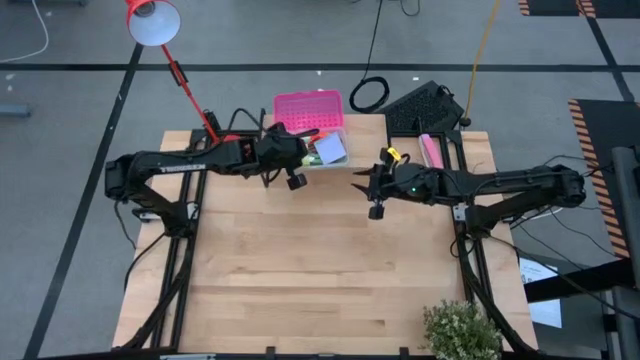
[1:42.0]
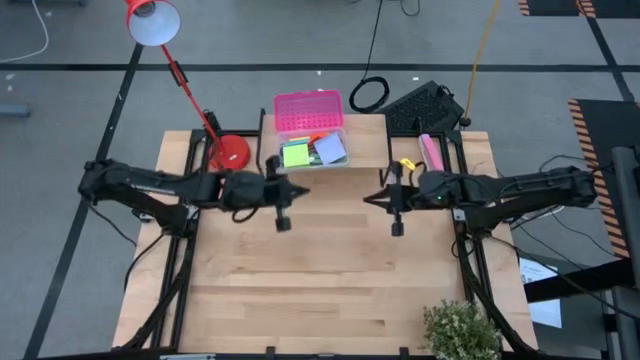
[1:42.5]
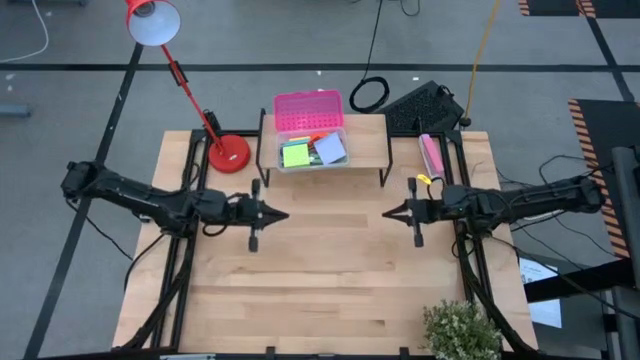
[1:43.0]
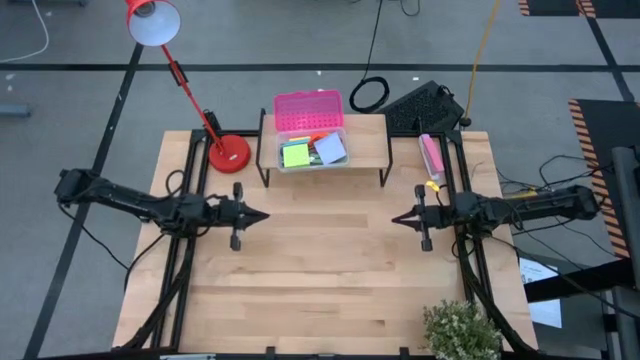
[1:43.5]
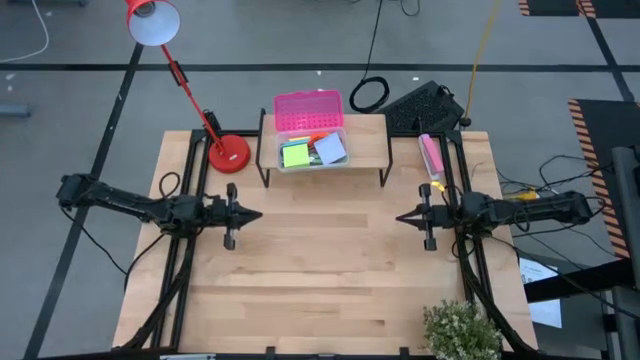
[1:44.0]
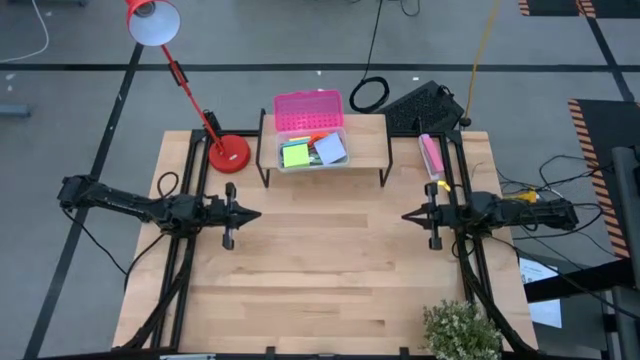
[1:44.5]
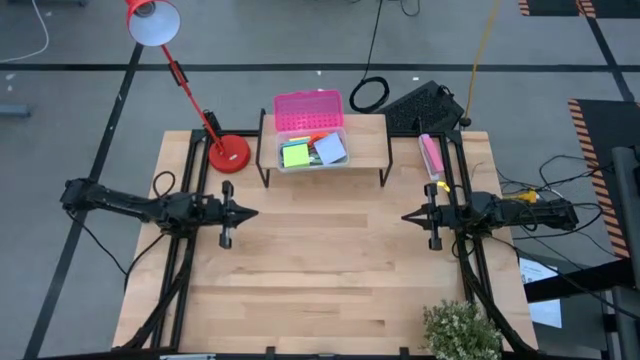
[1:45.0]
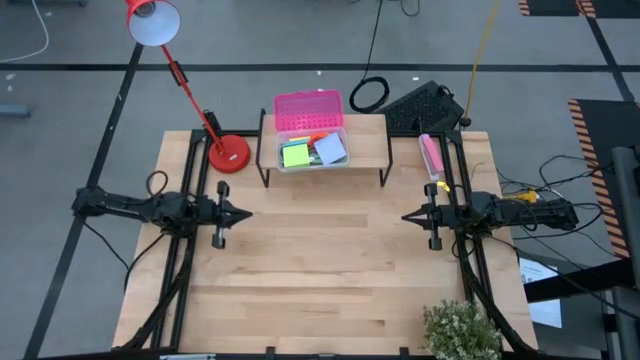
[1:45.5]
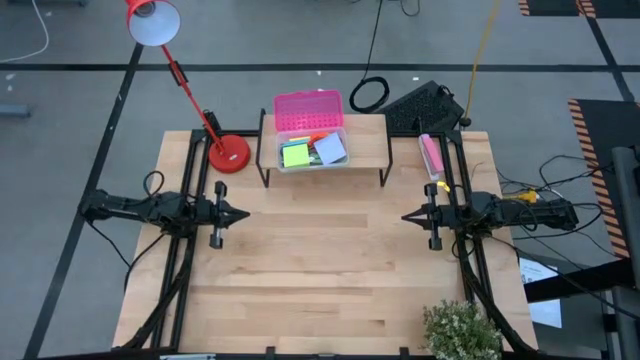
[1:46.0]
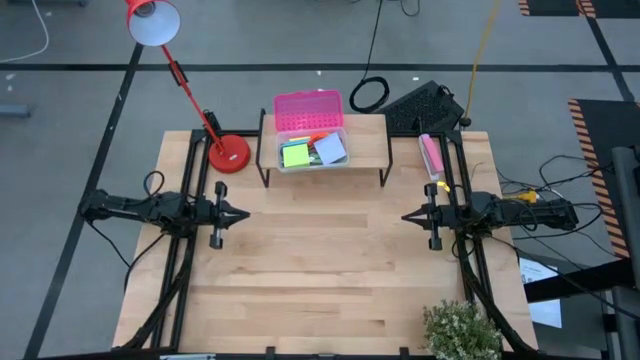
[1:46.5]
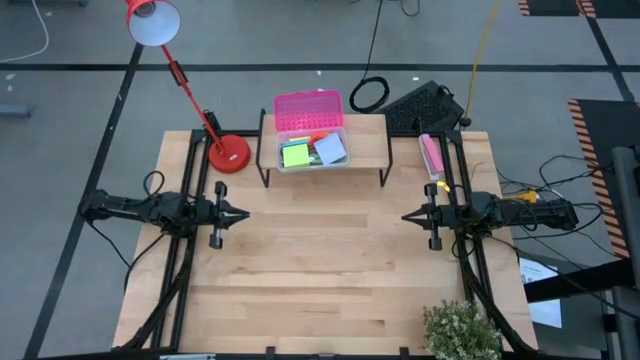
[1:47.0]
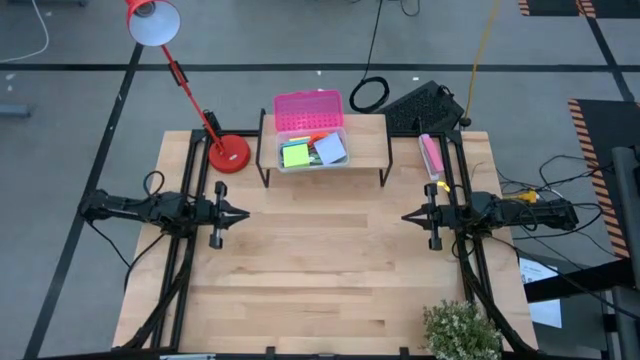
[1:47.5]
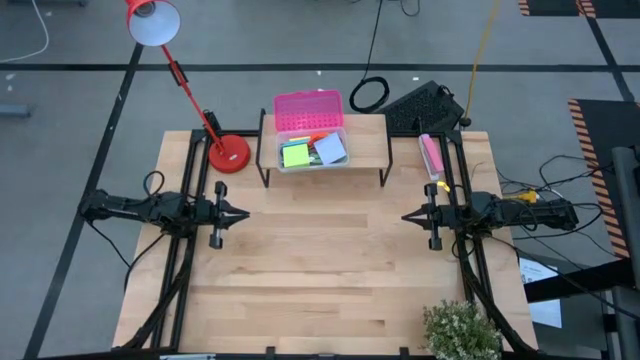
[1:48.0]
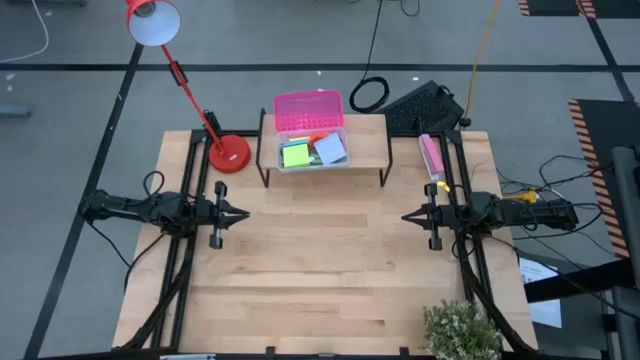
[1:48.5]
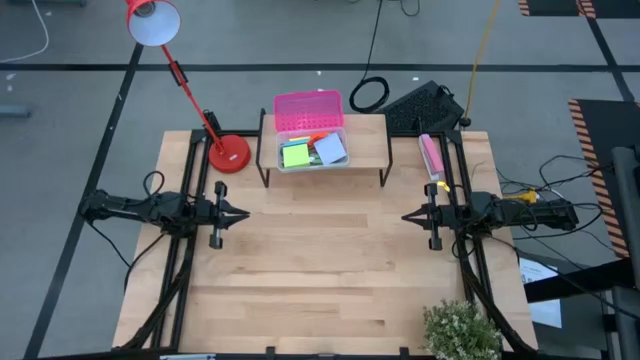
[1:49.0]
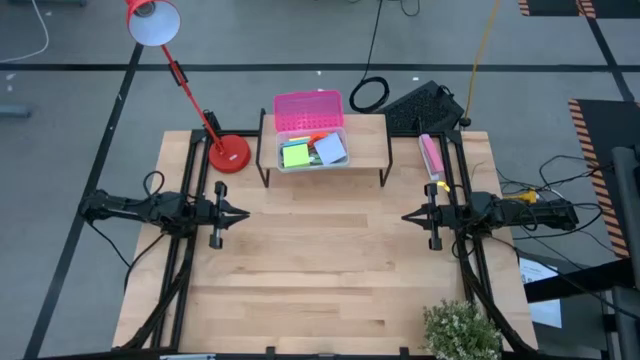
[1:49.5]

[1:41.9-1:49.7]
Task: Pack school essentials
Return to Home Position

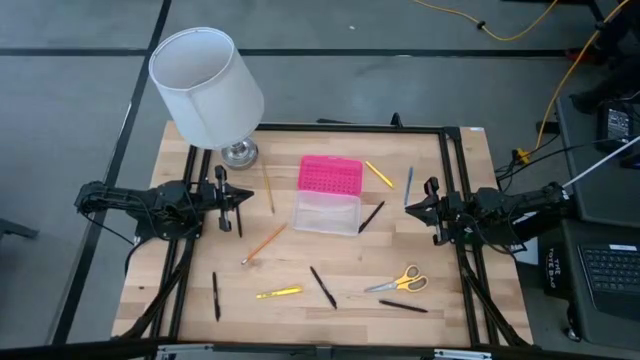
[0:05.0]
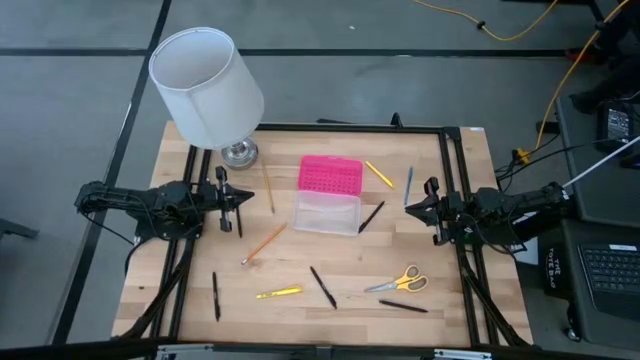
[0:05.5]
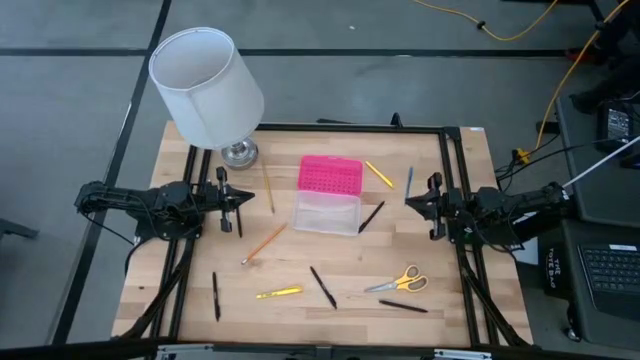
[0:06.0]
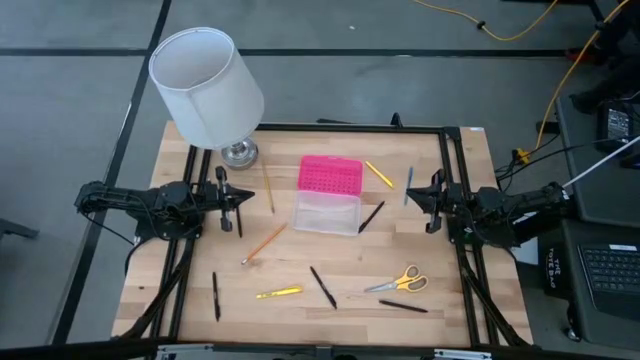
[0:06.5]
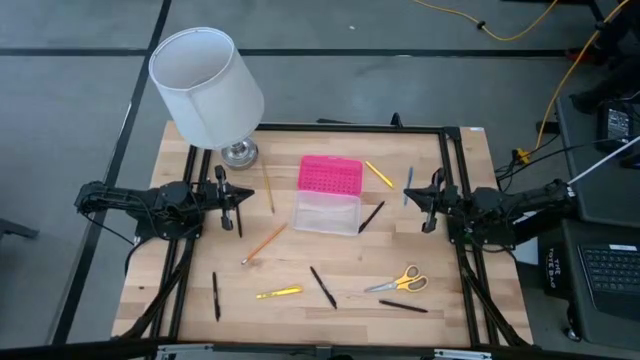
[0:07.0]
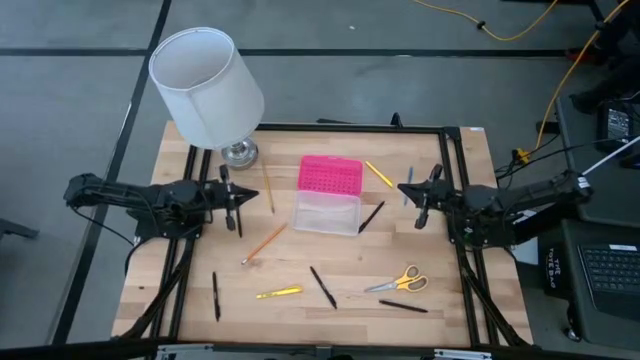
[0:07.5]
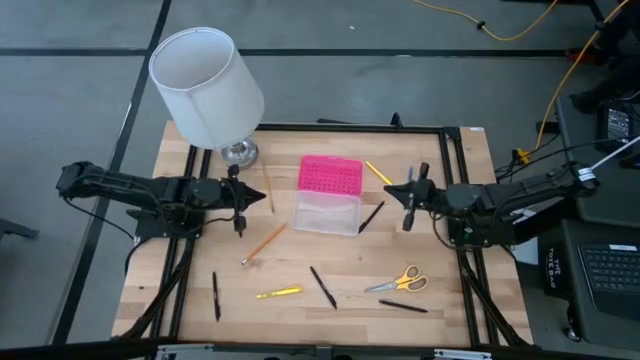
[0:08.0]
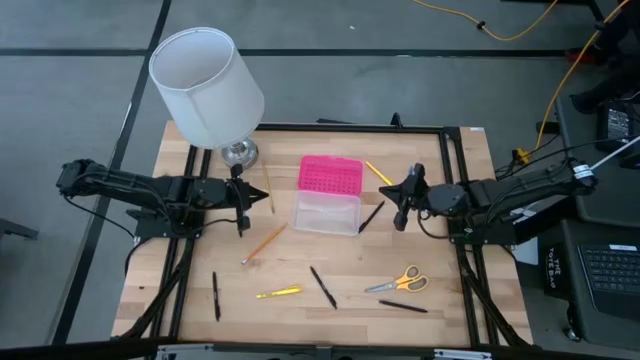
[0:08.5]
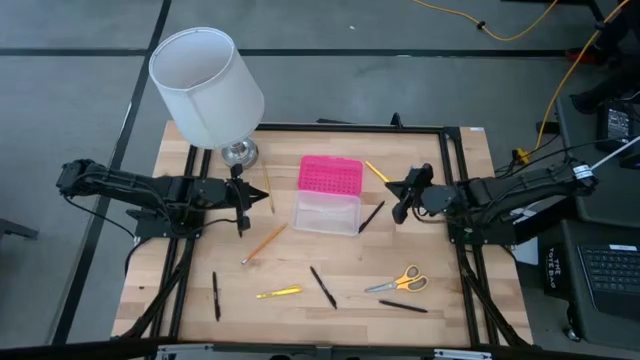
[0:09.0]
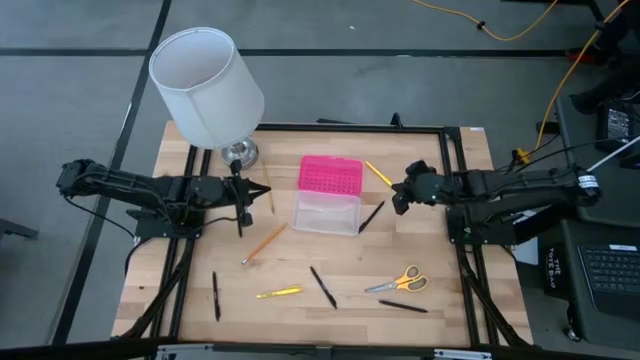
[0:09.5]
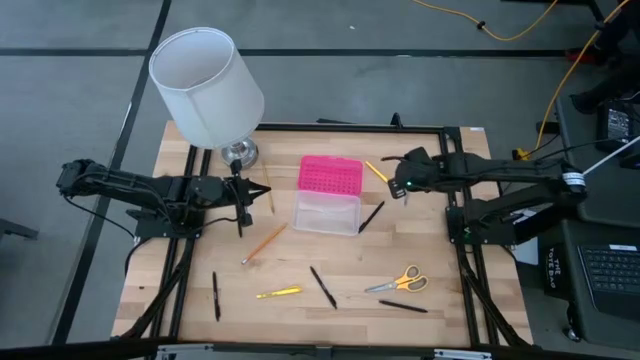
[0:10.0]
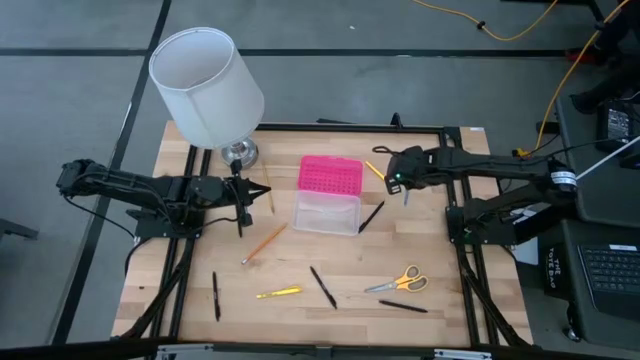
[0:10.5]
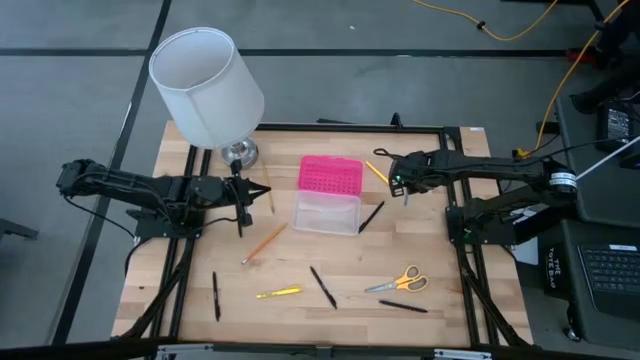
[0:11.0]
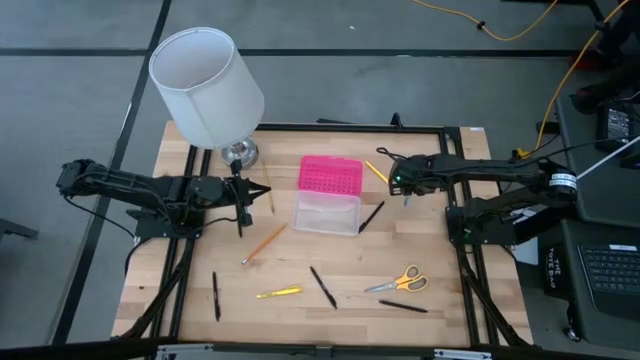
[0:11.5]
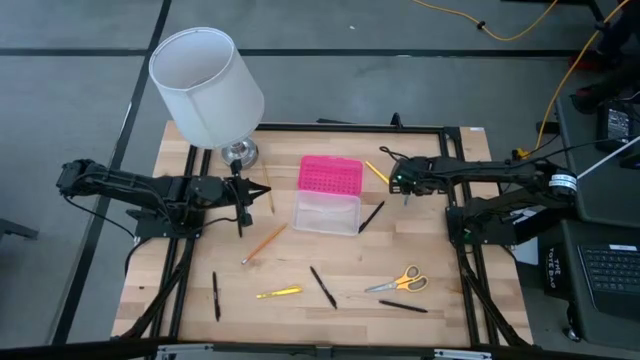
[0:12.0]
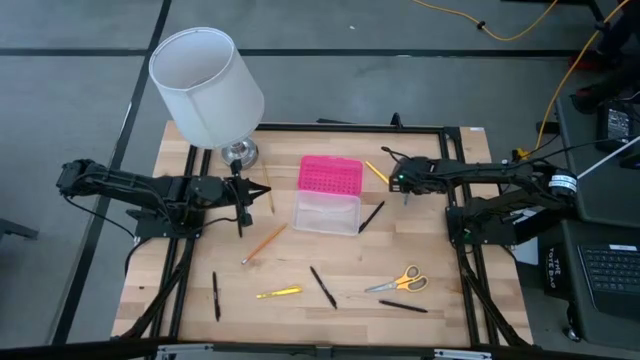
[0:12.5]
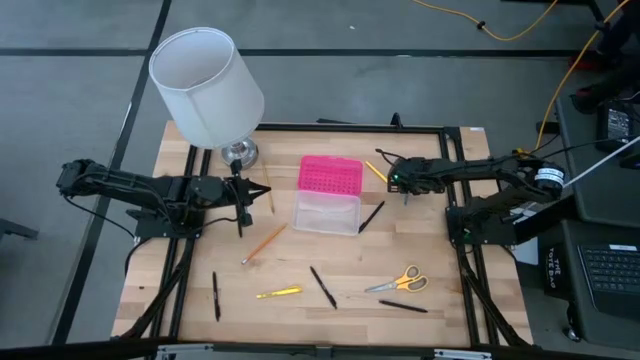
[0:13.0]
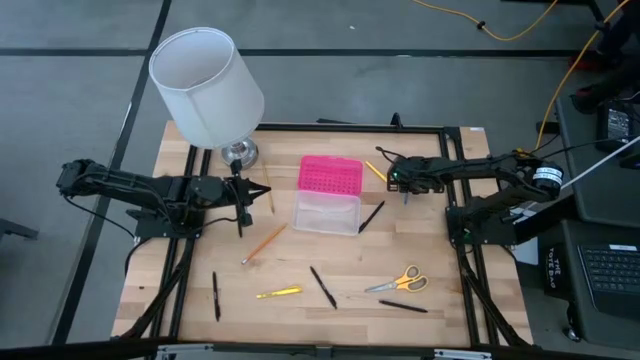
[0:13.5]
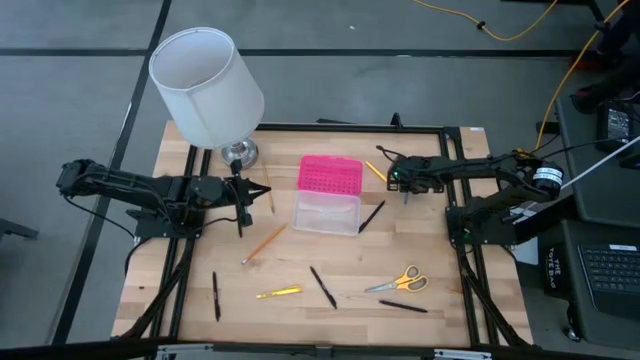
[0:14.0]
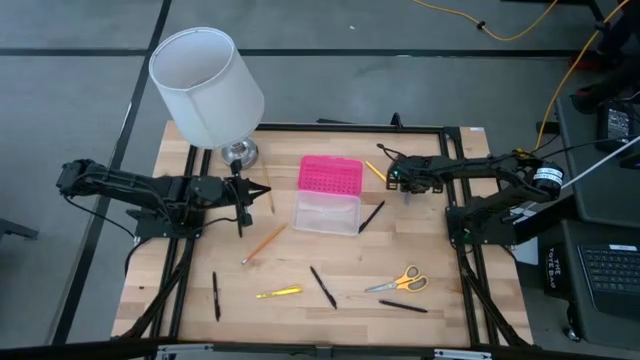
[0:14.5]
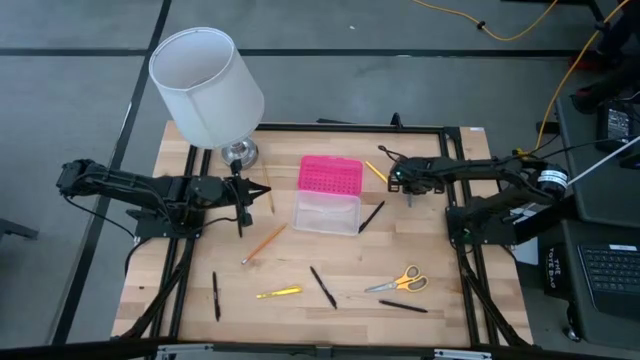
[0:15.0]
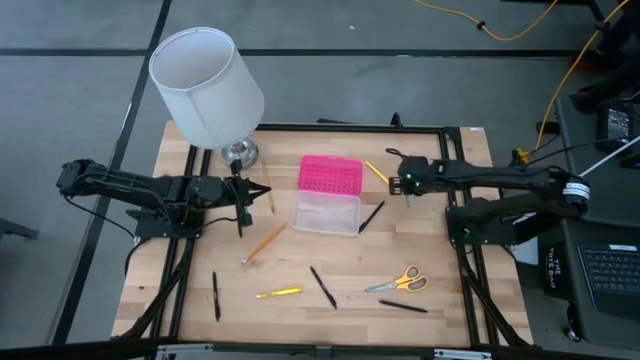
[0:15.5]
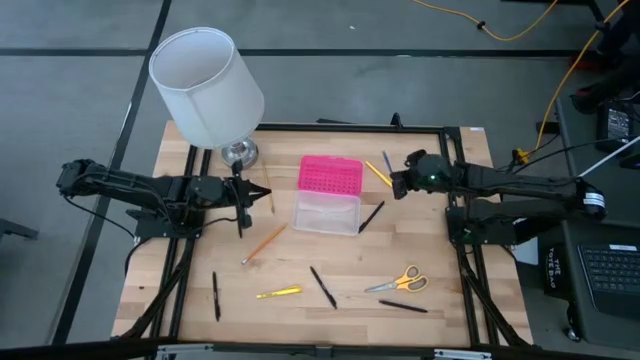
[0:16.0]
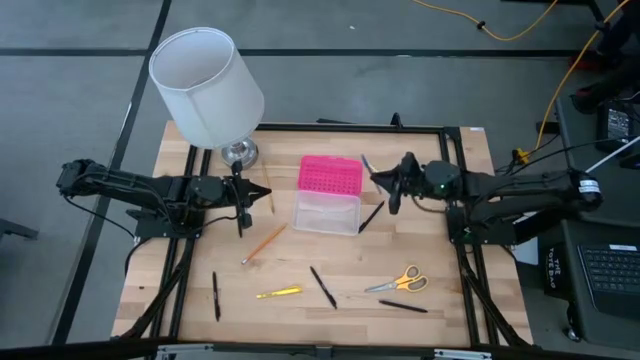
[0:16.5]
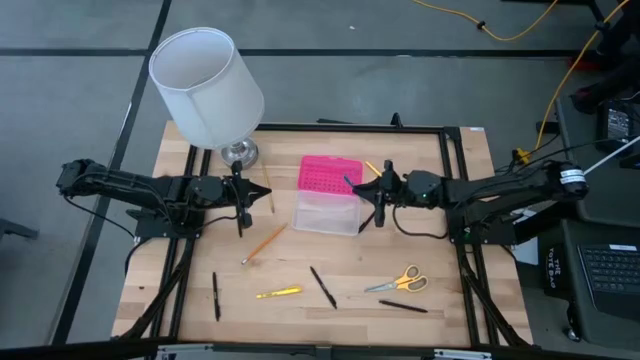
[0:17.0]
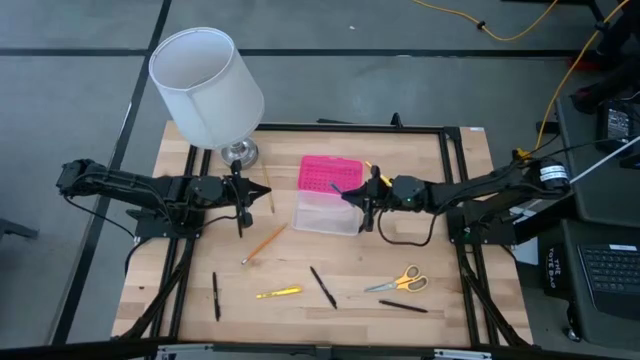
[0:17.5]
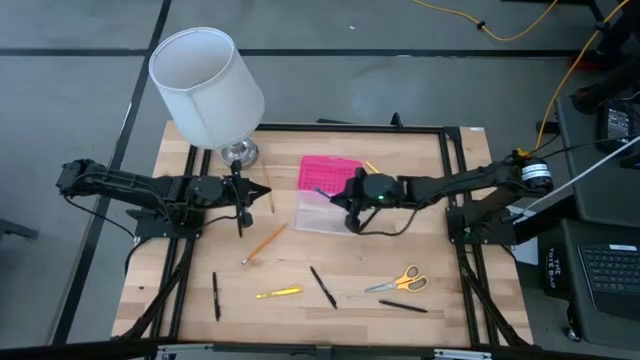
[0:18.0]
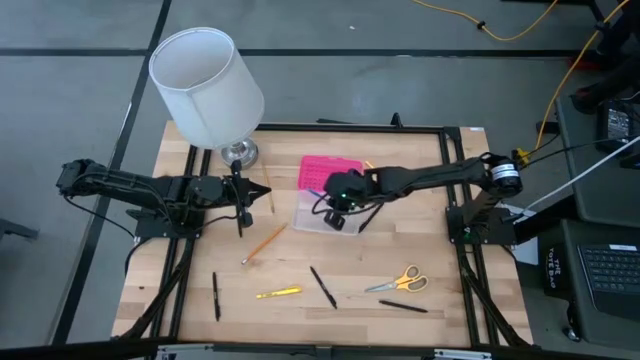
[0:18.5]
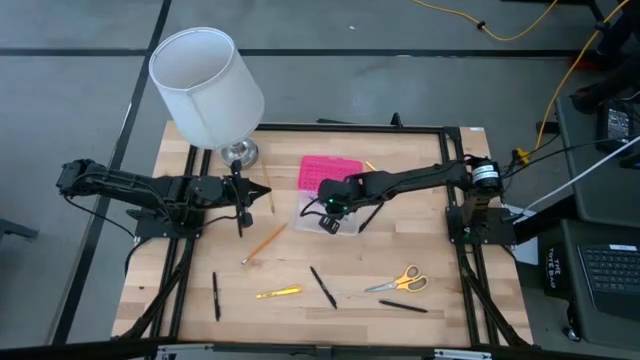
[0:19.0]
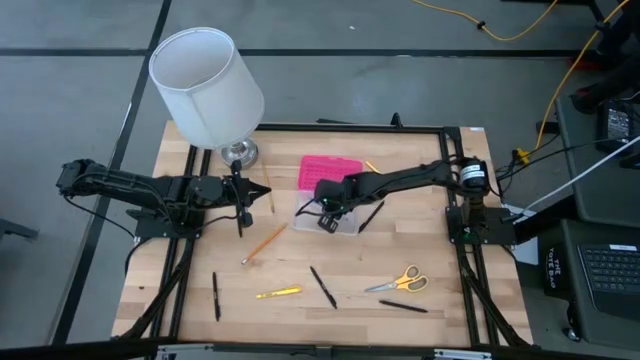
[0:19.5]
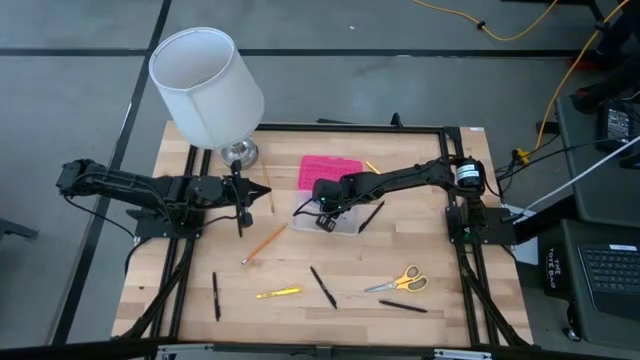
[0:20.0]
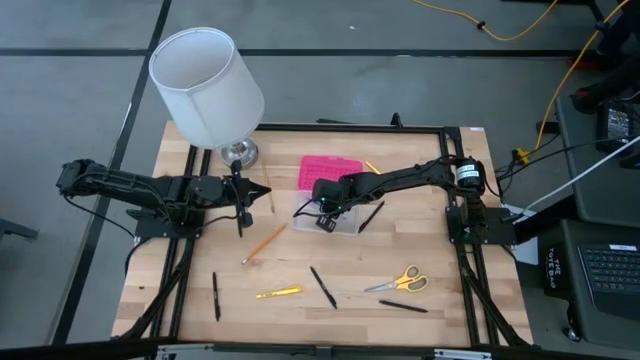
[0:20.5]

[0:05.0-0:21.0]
Task: Pick & place school supplies into a supply box
Put the blue pen into the transparent supply box
